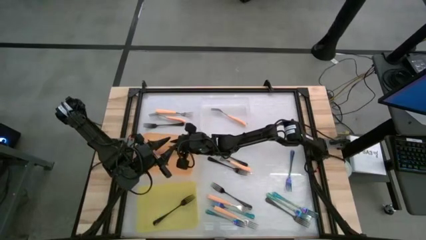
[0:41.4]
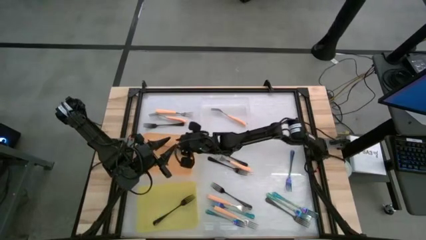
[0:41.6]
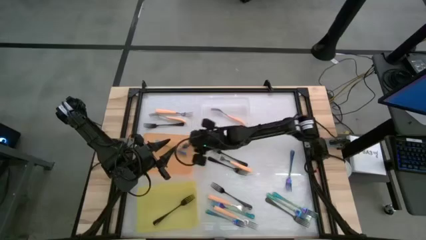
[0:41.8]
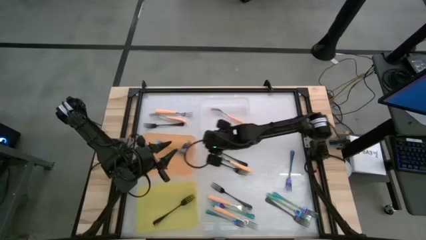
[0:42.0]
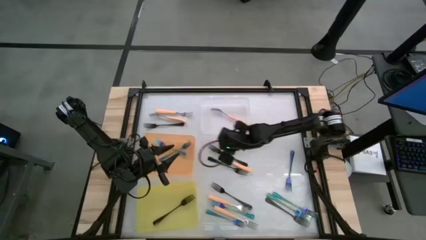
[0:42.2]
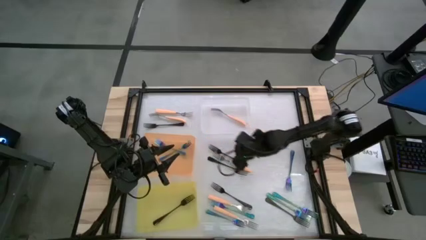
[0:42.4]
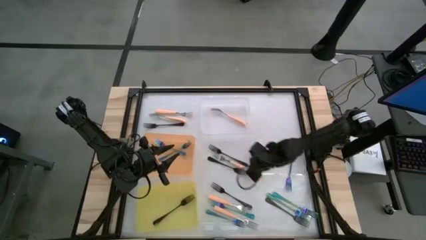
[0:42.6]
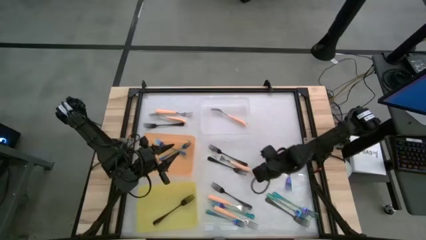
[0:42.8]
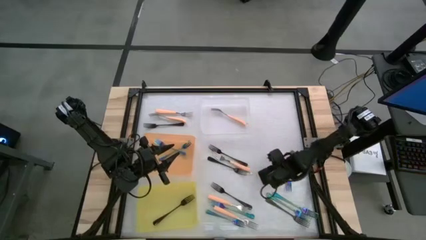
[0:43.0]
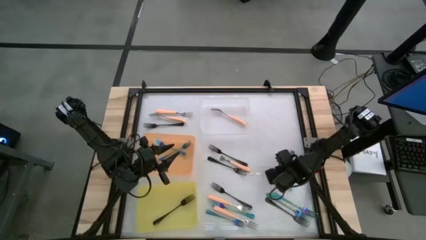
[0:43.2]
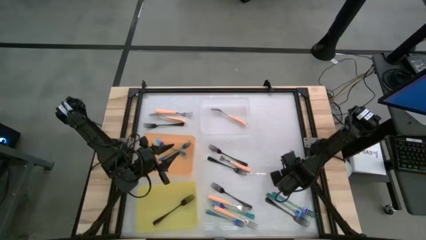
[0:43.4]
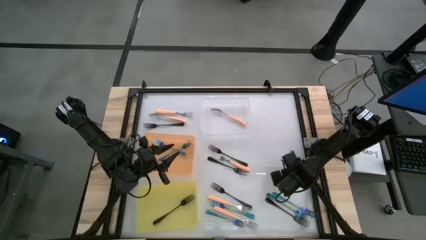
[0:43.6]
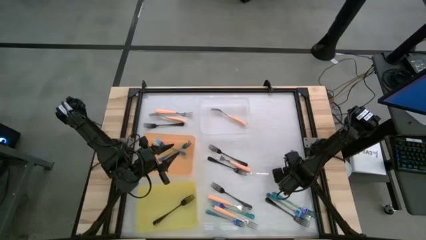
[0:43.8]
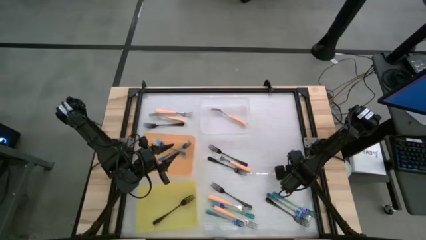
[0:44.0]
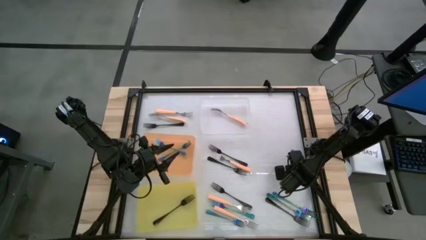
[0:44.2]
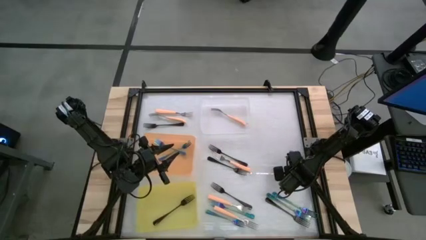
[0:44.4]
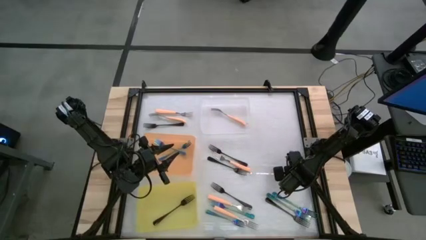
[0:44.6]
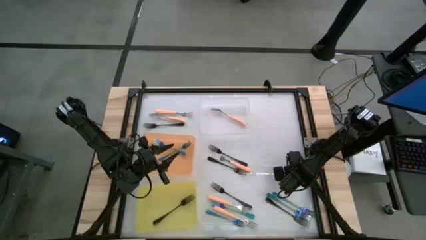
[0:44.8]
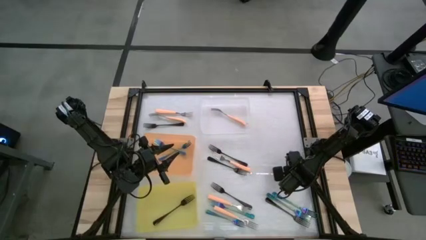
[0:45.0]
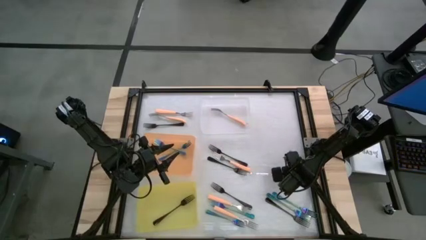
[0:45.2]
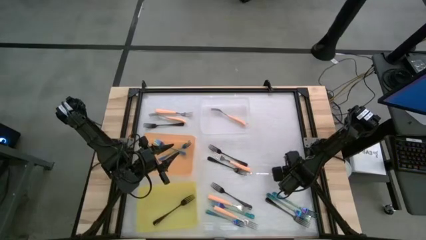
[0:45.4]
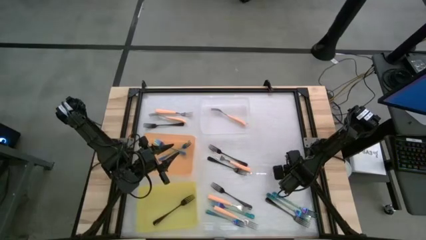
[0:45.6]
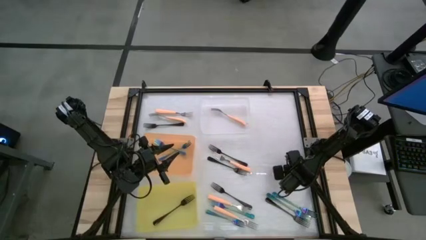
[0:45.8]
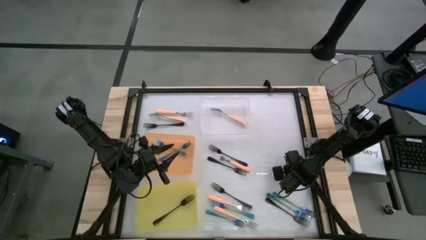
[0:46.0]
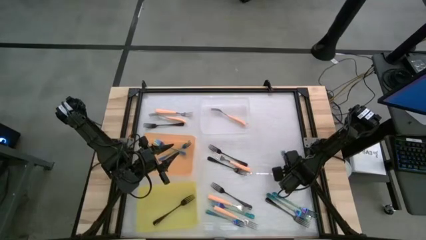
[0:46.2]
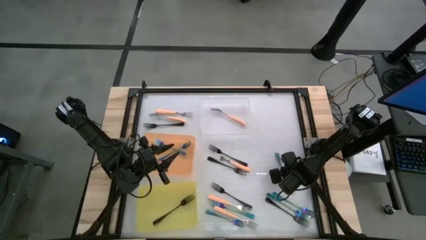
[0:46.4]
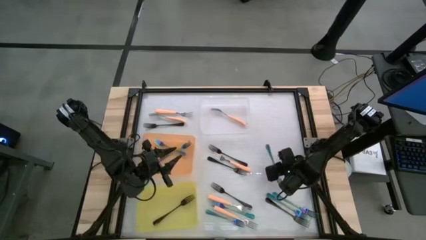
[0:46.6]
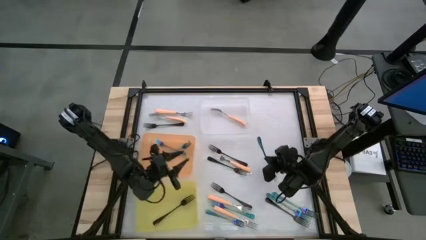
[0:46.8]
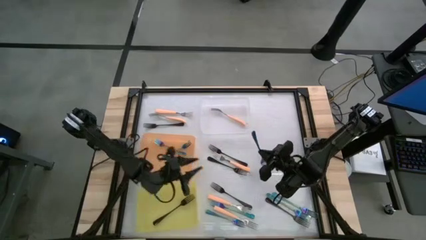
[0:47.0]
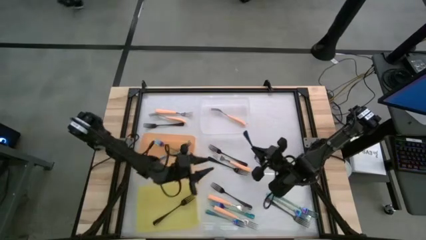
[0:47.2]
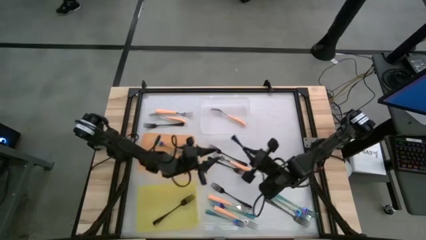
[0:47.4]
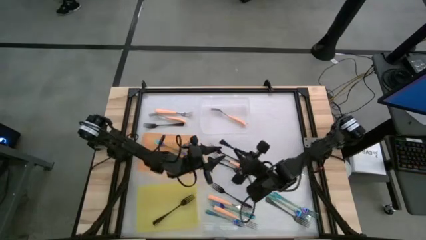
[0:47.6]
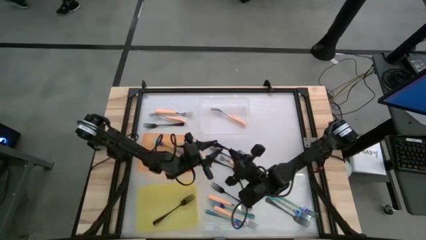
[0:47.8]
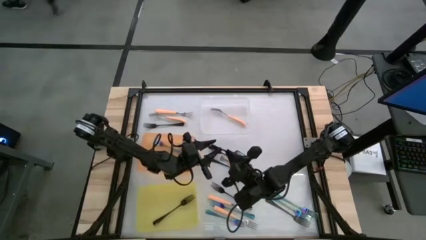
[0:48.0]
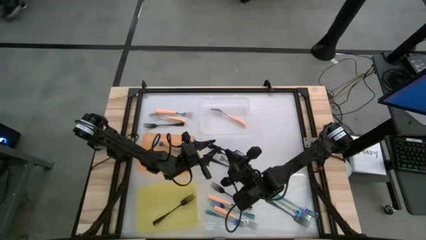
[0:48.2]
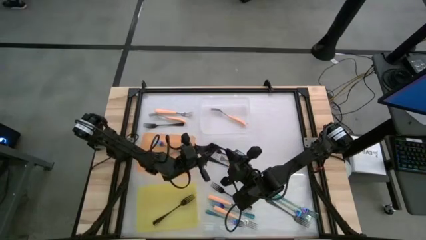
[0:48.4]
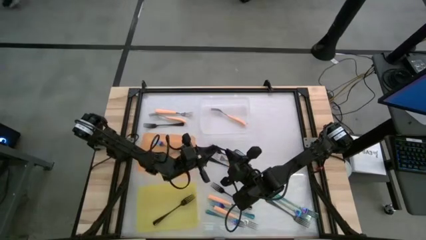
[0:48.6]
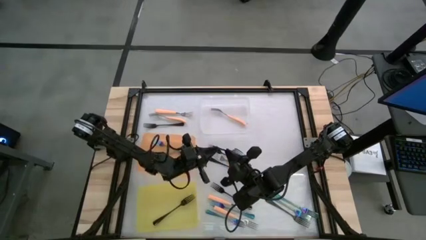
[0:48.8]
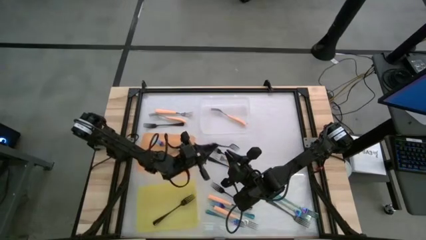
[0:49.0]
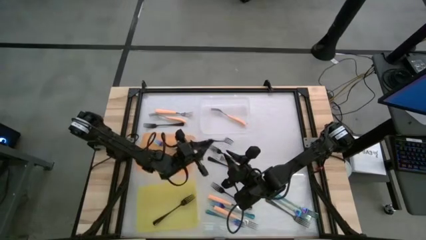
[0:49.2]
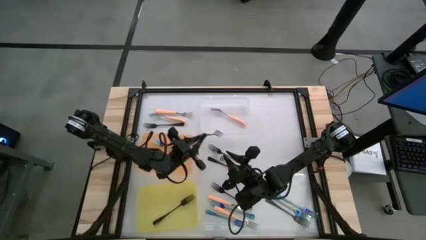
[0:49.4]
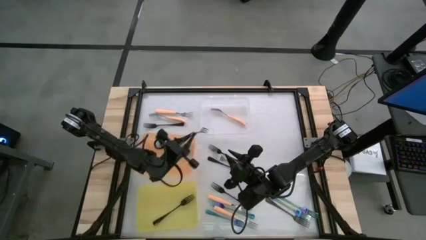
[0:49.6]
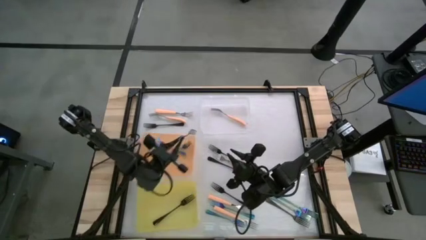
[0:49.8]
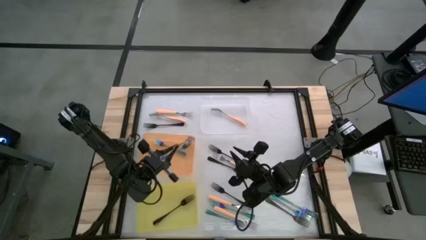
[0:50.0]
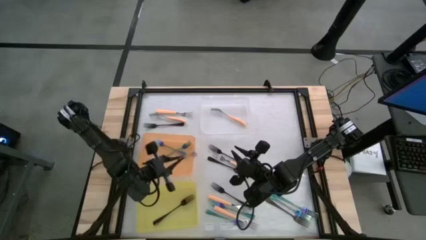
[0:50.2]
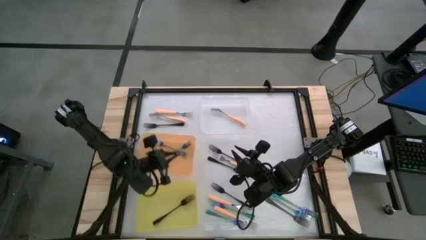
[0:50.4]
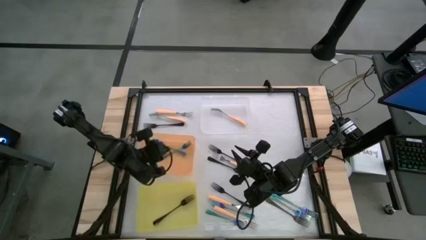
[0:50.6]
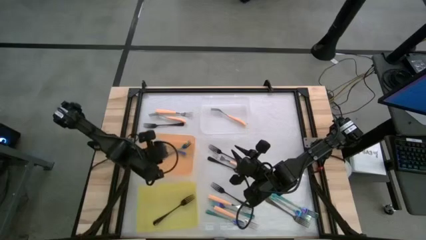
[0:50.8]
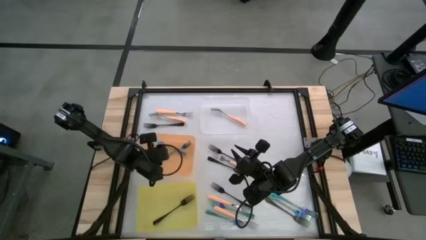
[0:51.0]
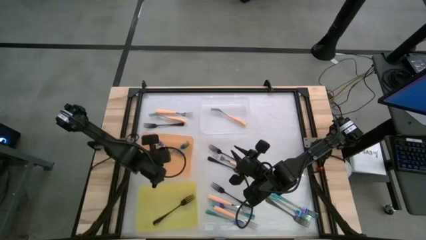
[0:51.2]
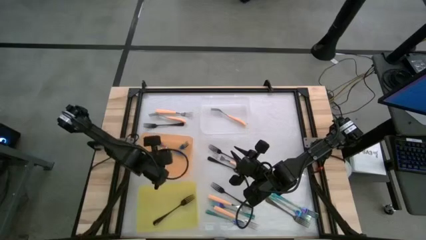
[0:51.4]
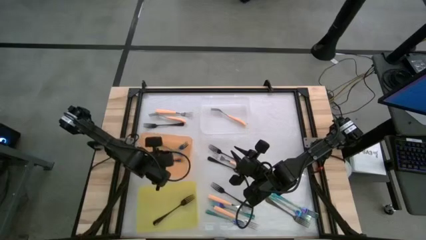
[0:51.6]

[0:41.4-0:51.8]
Task: Sort silverware by color (type)
Put the blue fork into the orange bin

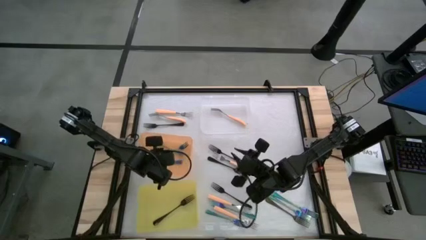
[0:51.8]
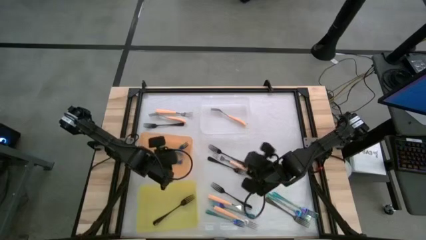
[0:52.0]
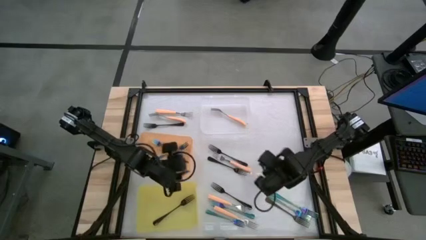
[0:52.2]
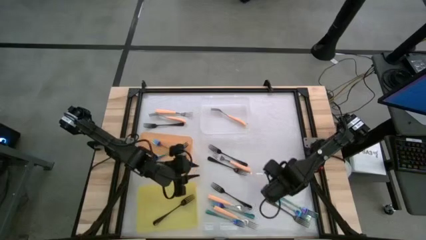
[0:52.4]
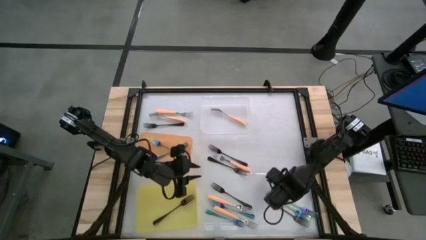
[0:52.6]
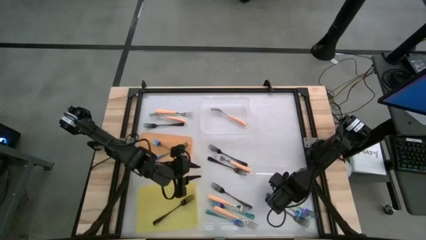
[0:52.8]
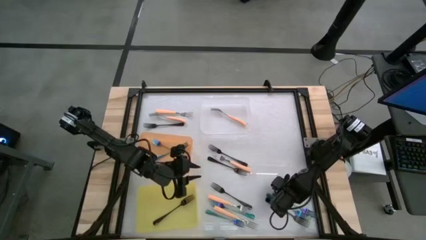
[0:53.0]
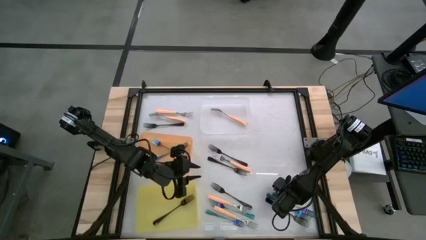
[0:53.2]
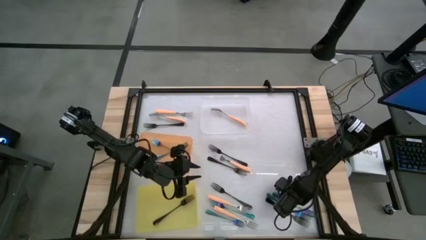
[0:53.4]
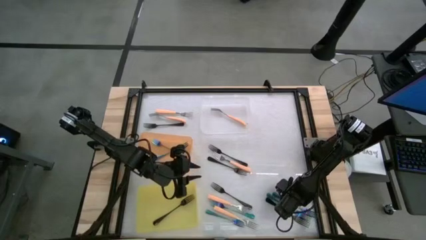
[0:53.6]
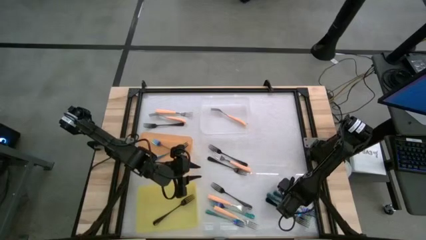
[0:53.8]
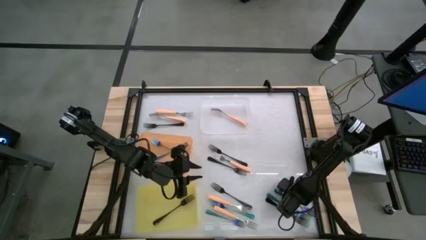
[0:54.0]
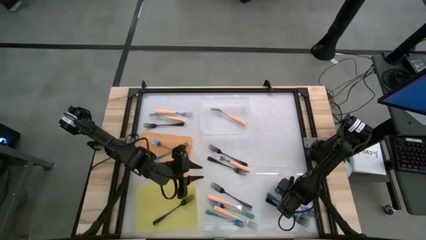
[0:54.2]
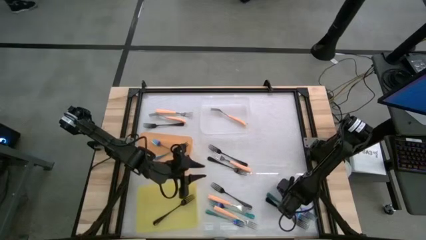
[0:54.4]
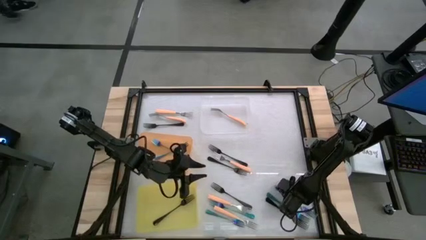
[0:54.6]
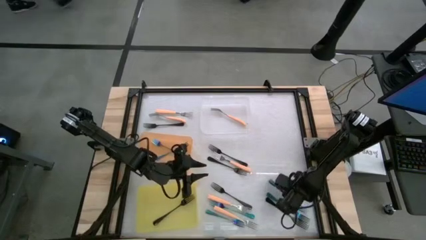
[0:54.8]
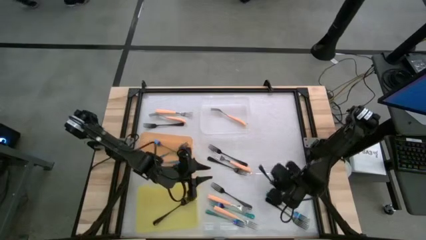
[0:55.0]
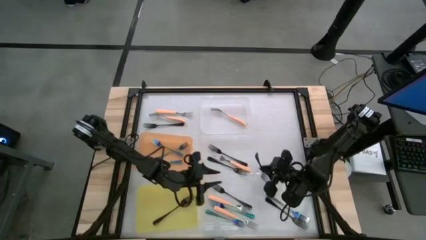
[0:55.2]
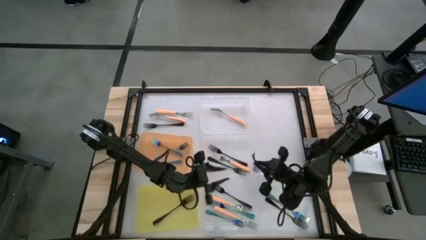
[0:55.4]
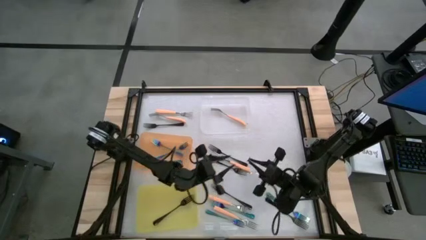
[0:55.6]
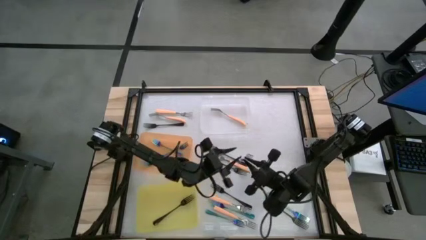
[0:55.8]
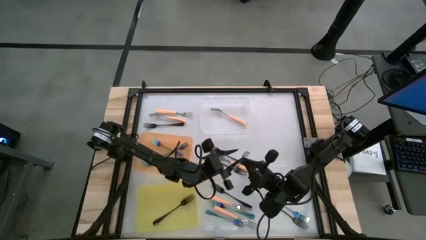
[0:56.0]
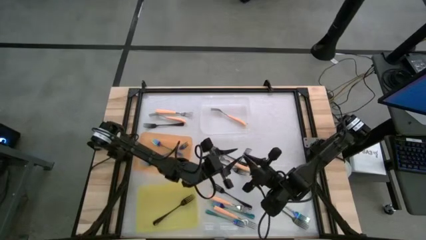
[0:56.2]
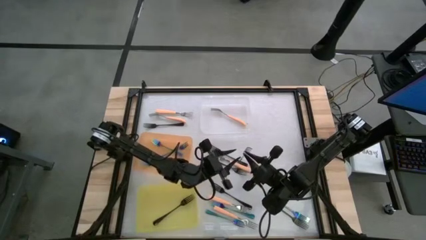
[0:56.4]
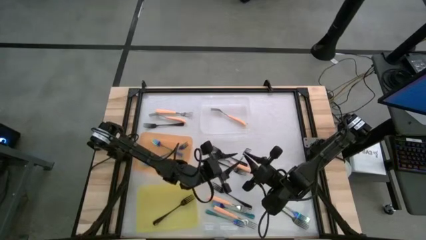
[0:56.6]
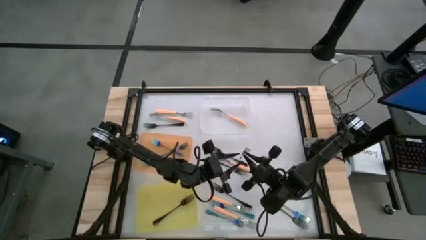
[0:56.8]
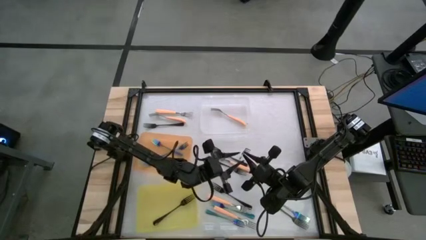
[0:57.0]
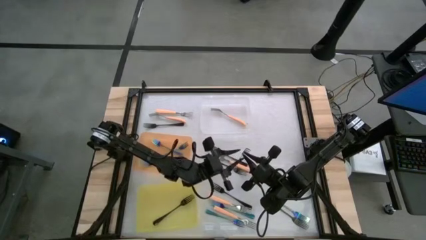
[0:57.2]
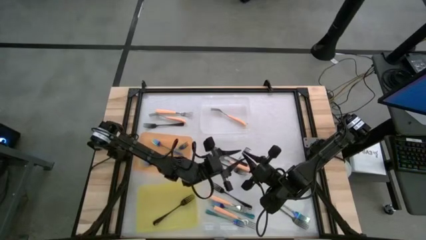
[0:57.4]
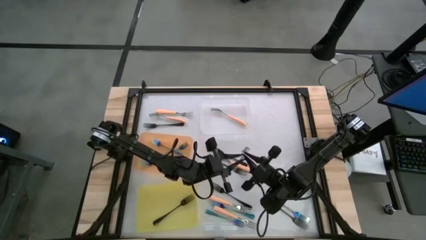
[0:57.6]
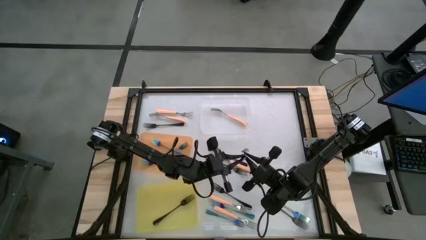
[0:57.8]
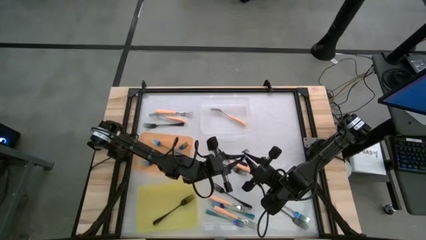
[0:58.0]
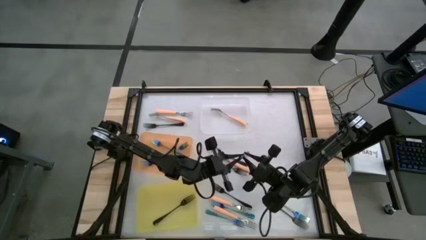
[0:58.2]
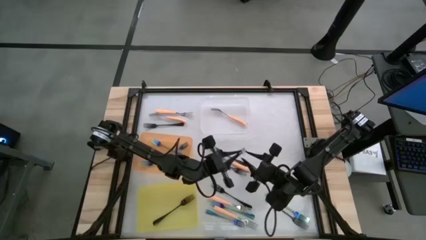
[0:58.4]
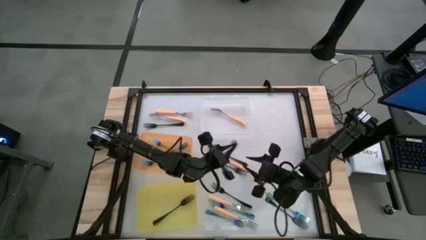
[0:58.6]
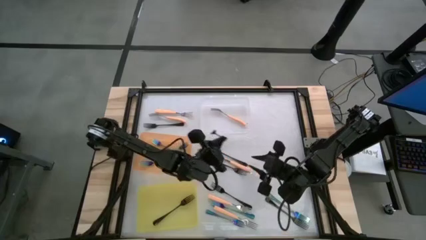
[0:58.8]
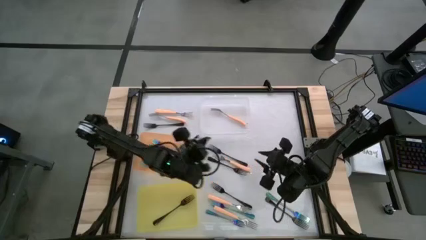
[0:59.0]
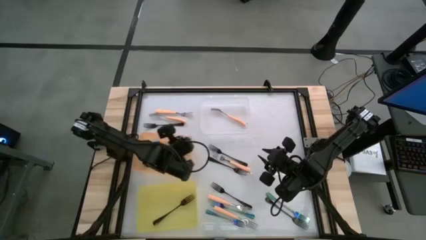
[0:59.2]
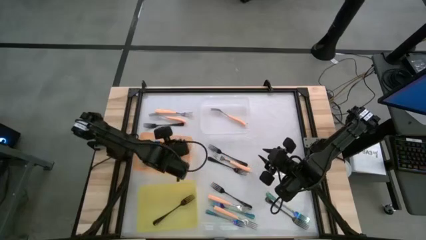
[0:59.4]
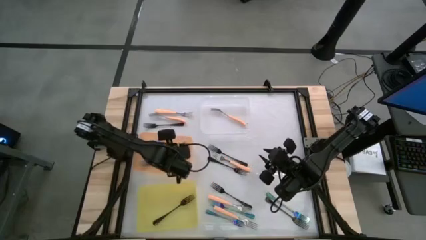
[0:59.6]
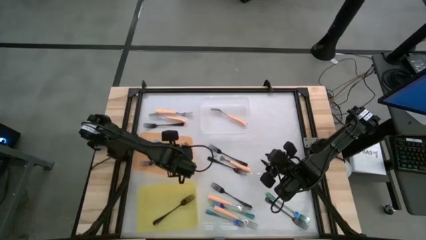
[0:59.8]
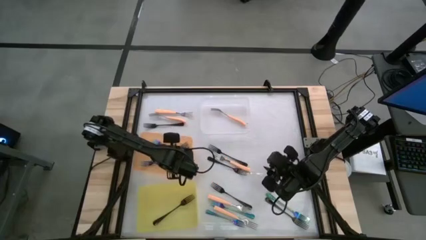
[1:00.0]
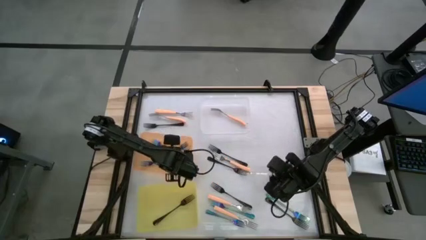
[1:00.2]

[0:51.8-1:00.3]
Put the blue fork into the orange bin
